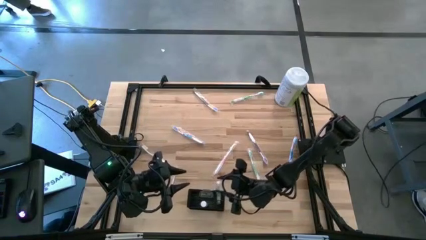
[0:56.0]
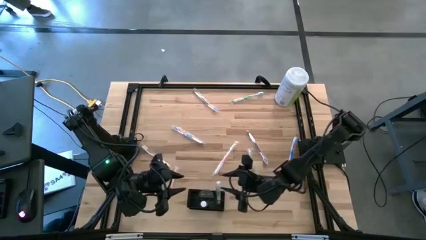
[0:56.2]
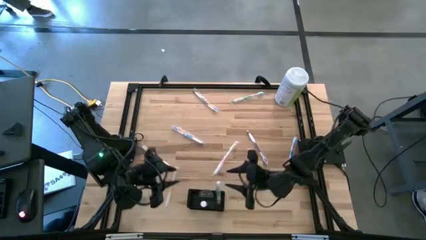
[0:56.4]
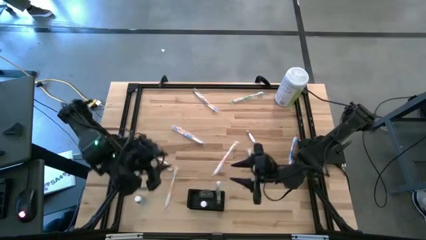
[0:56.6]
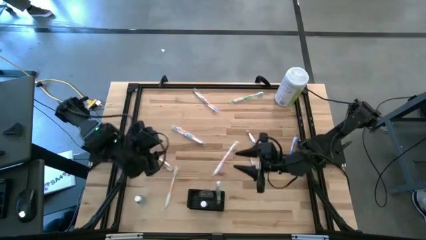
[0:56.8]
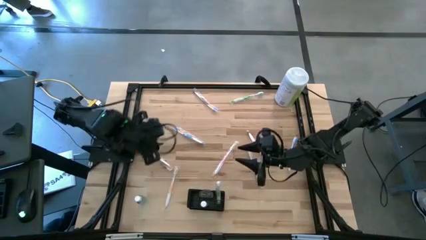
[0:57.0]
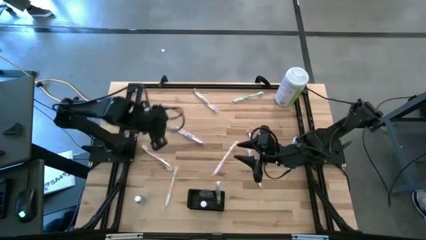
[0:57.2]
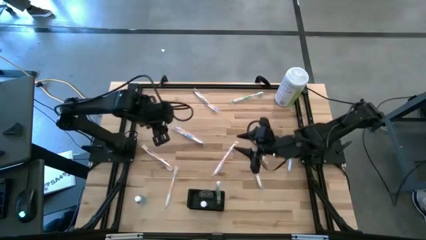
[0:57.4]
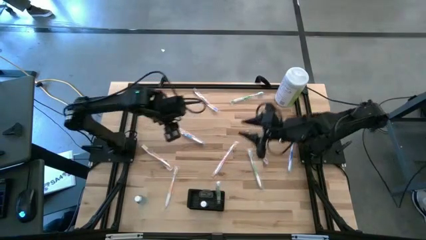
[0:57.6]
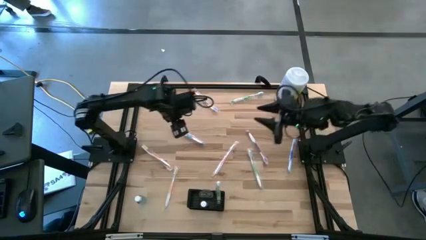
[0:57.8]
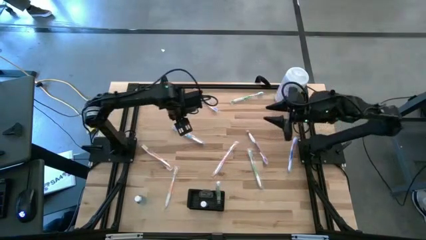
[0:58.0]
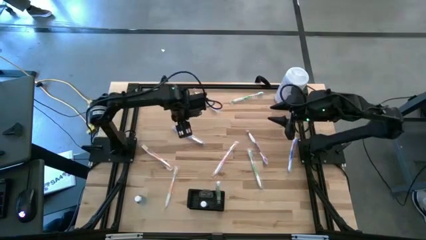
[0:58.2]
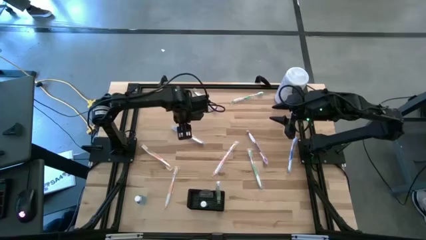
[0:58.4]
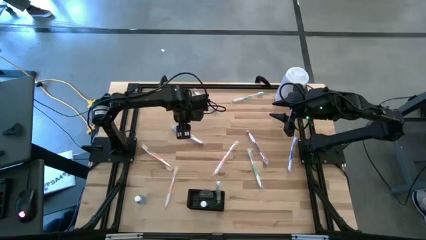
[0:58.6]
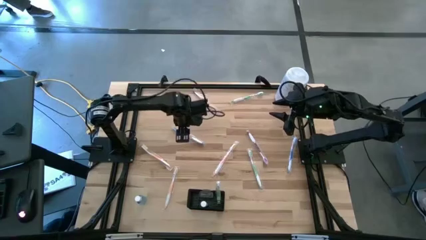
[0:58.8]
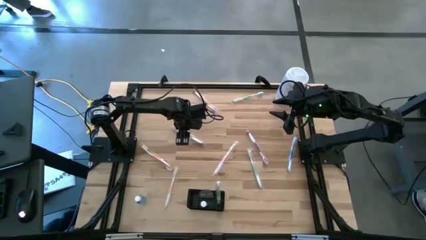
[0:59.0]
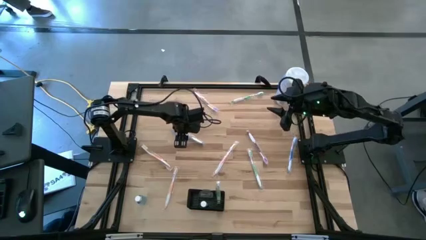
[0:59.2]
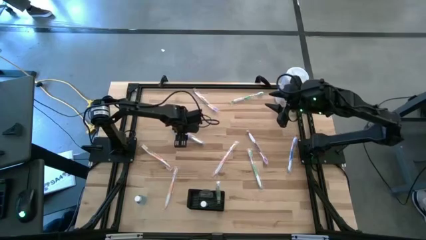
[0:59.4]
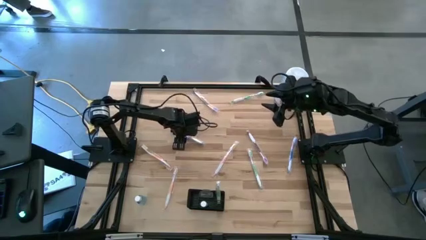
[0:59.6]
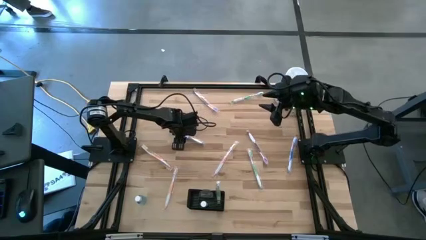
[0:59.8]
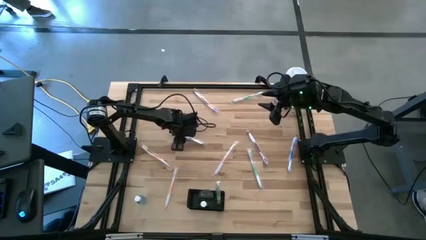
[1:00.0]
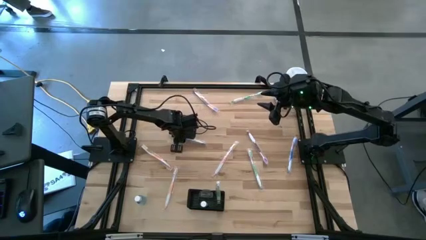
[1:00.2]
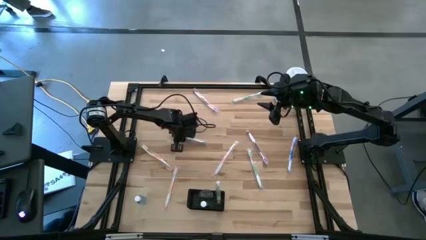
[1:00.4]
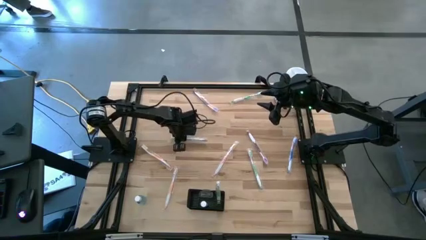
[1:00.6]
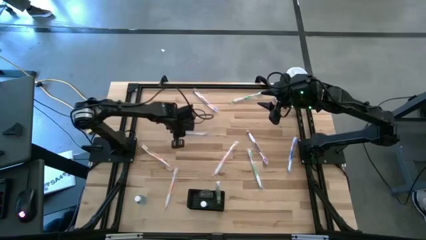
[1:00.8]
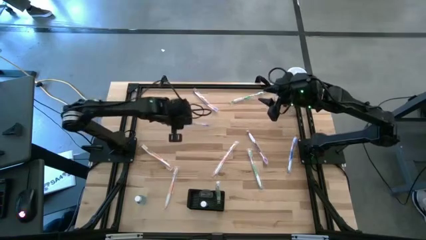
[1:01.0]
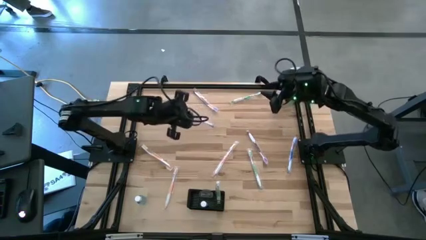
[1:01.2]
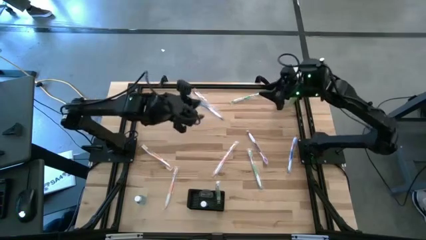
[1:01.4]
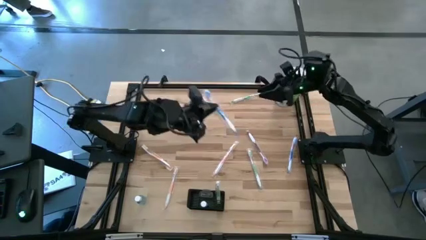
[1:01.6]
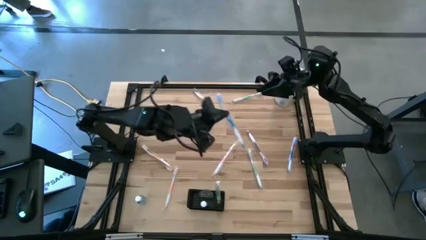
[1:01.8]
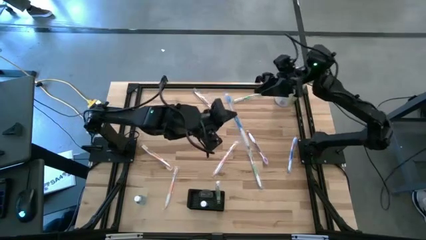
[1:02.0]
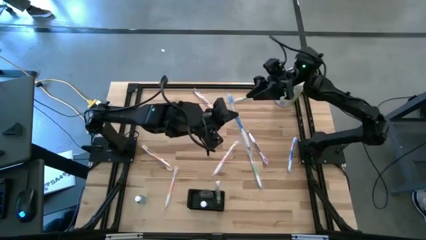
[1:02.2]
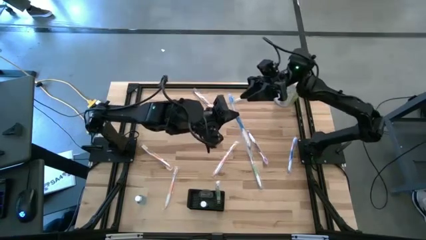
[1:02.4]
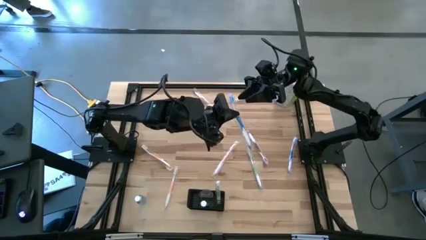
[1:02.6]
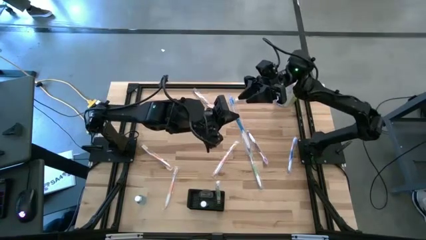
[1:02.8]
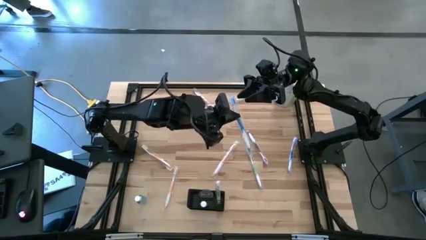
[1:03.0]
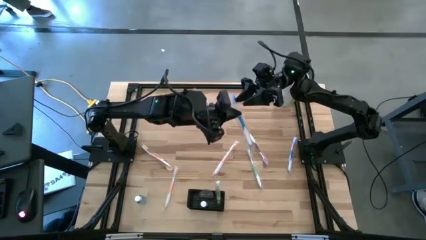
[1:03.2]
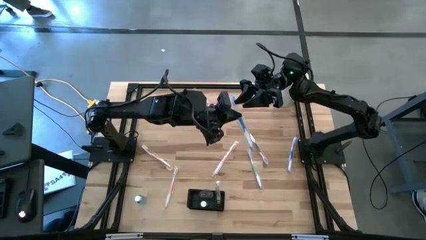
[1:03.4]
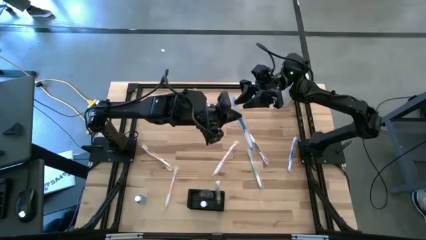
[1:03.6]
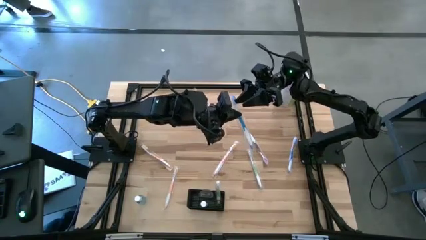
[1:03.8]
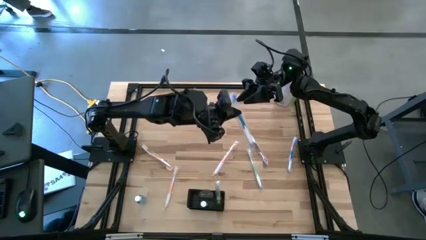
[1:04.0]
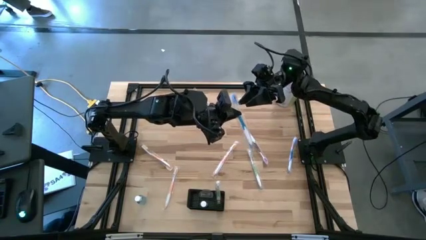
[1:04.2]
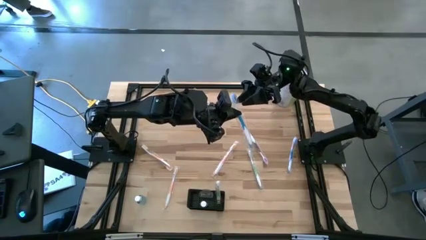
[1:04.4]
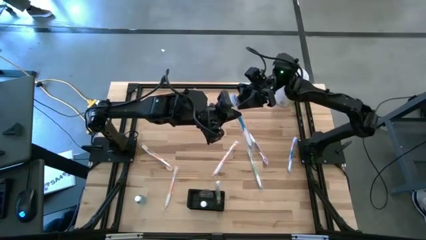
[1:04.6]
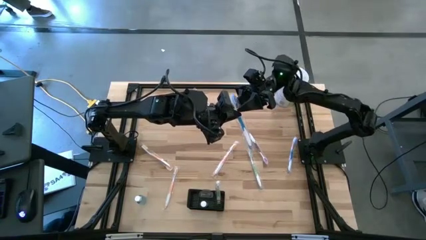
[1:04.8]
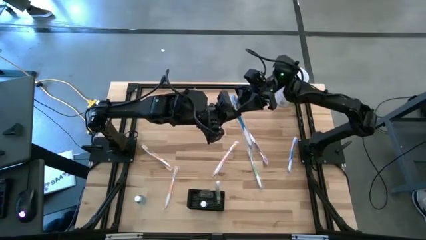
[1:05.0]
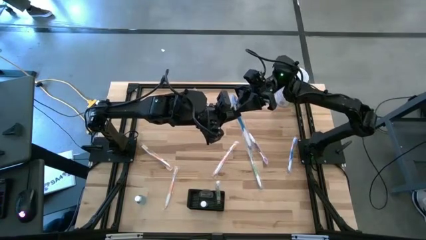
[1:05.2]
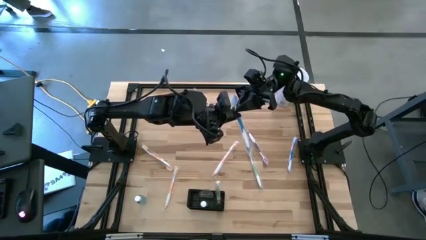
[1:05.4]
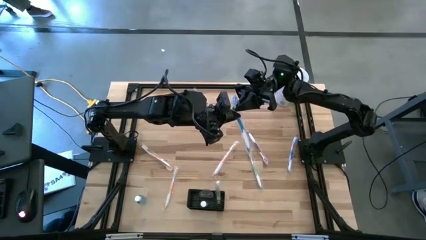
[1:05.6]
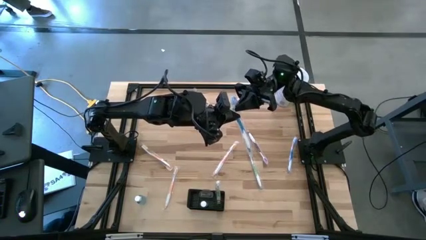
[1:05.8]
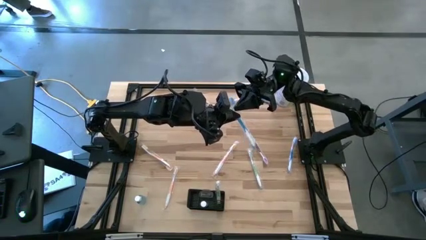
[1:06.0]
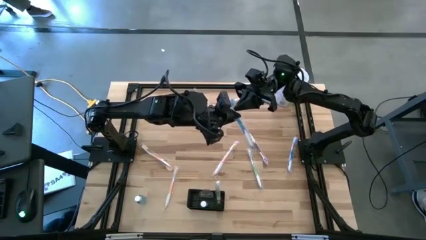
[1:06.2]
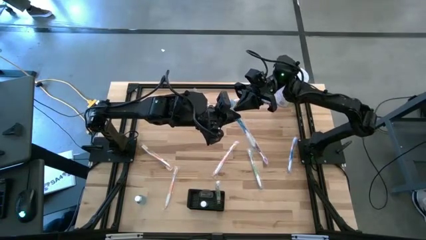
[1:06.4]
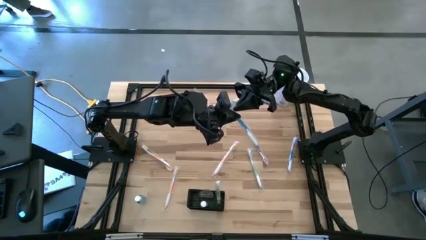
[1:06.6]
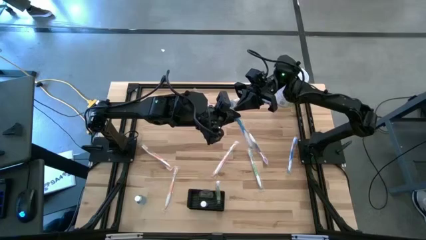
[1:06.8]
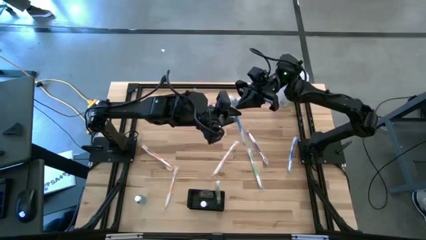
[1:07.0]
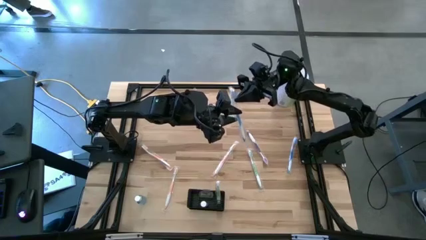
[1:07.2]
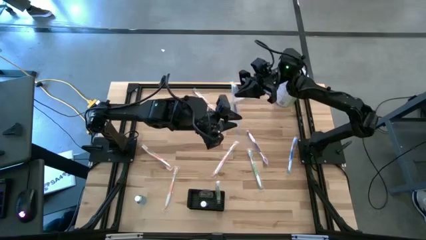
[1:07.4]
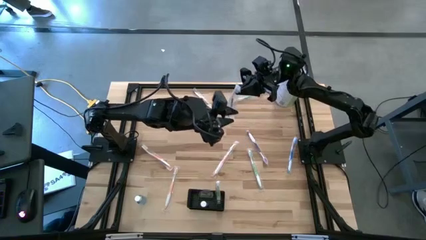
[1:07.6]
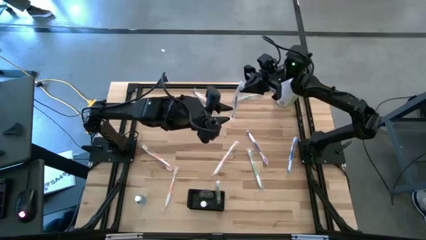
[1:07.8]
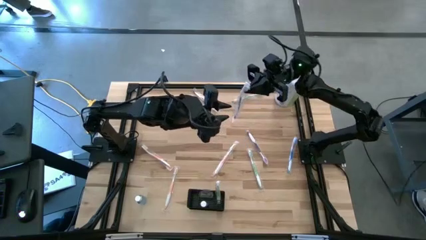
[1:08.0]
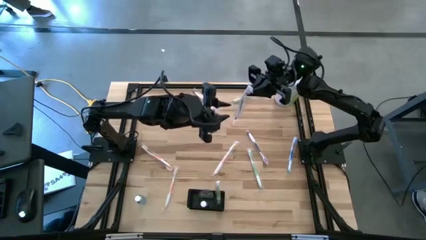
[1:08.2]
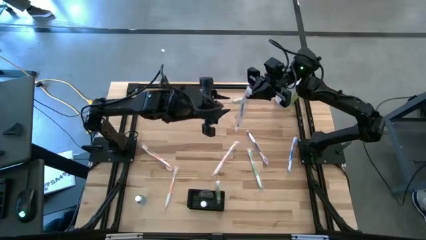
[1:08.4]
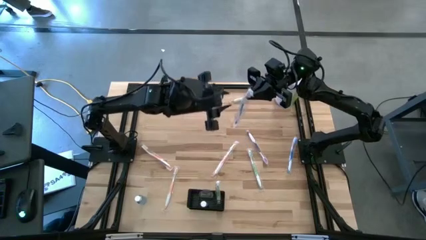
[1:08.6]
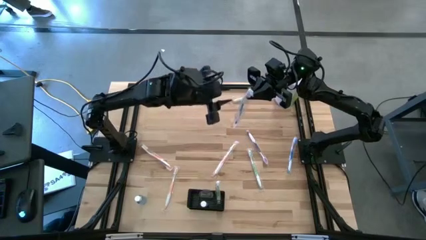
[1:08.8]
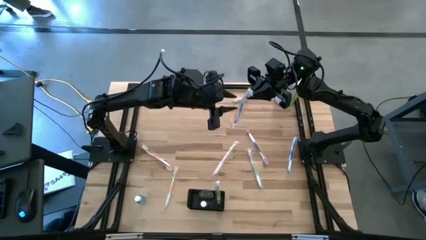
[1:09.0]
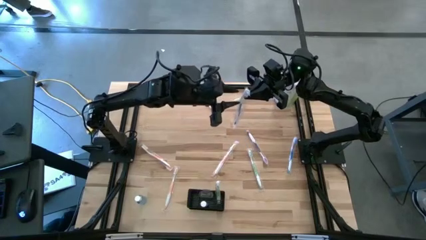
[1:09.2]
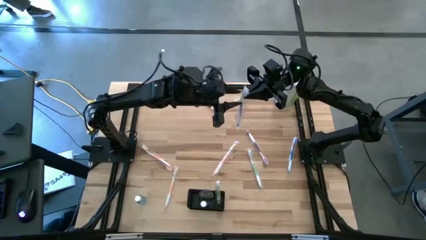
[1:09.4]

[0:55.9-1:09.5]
Task: Pick & Place toothbrushing station
Put the left blue toothbrush into the black wire organizer

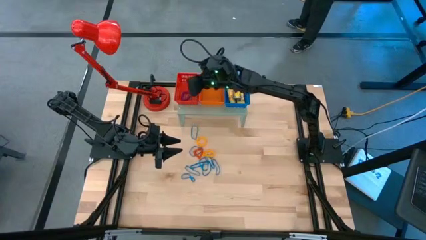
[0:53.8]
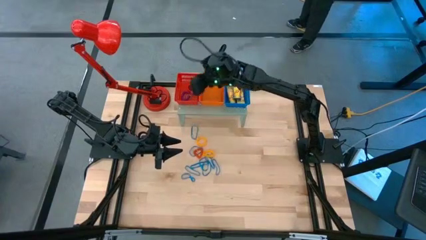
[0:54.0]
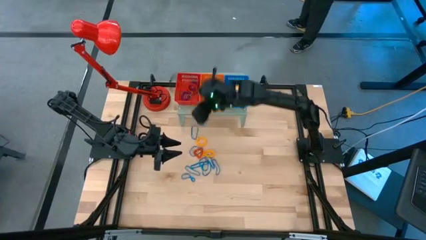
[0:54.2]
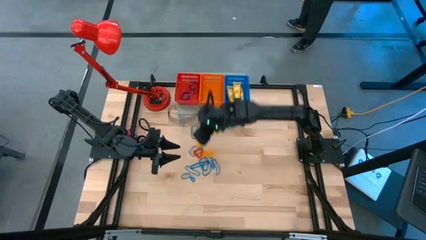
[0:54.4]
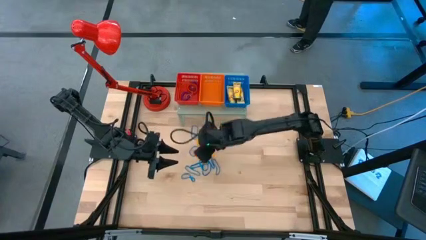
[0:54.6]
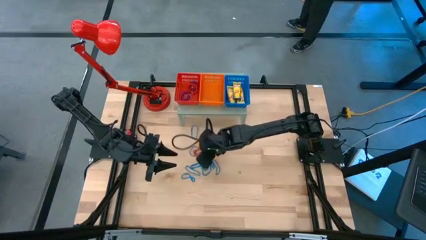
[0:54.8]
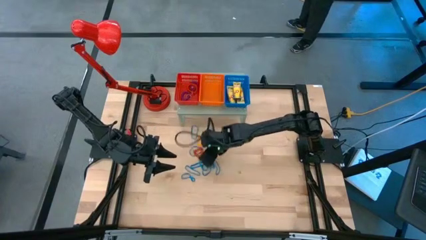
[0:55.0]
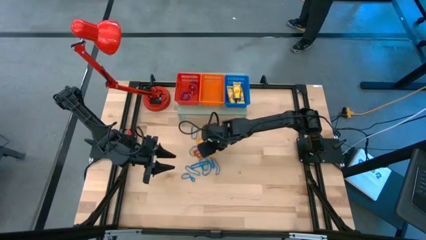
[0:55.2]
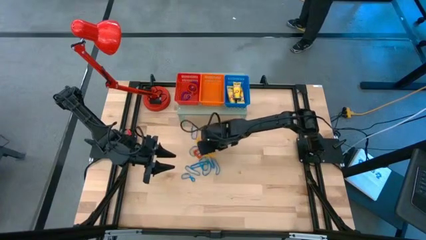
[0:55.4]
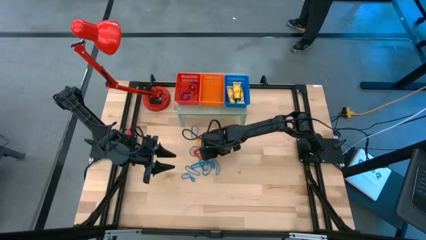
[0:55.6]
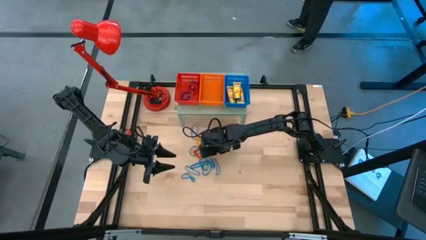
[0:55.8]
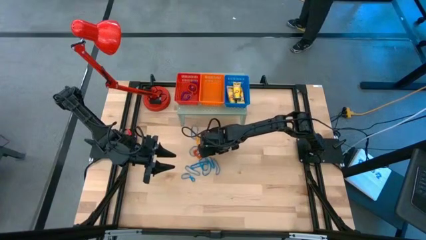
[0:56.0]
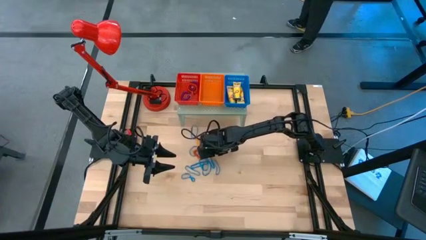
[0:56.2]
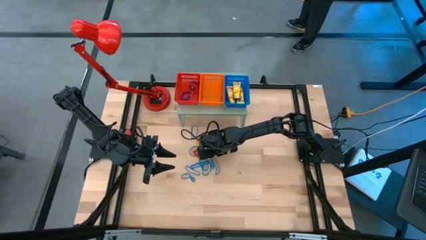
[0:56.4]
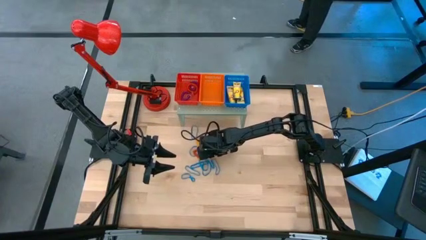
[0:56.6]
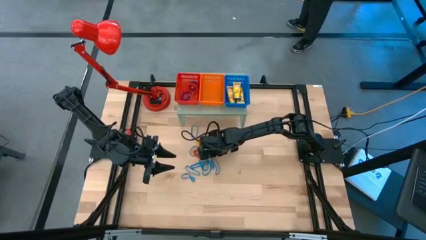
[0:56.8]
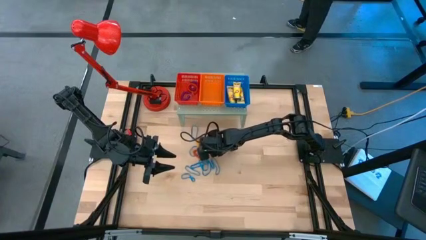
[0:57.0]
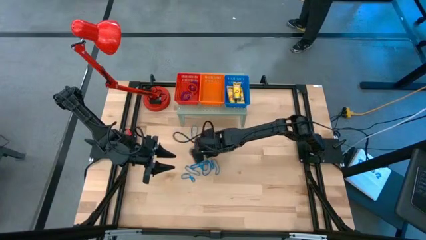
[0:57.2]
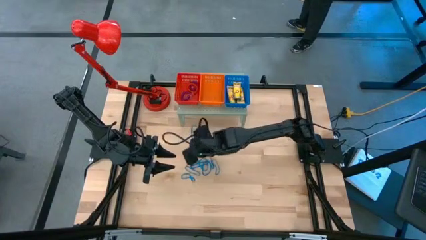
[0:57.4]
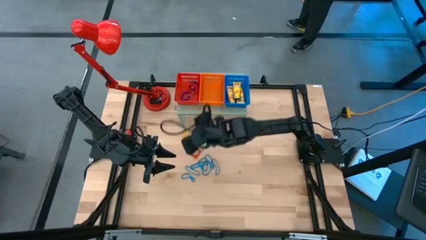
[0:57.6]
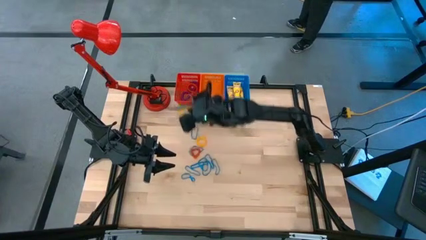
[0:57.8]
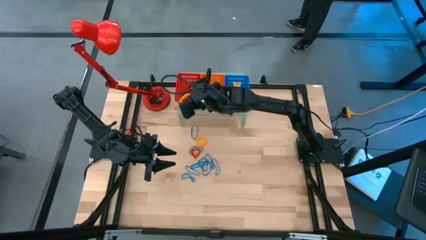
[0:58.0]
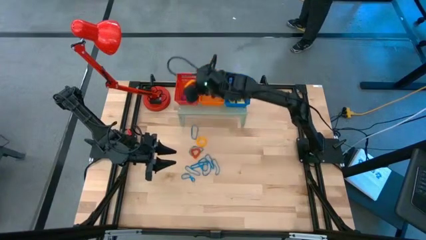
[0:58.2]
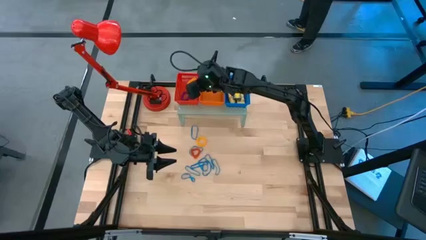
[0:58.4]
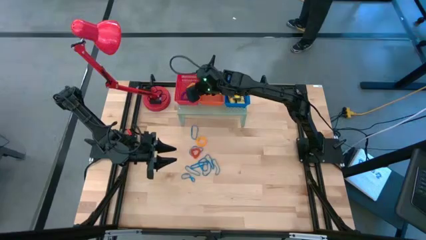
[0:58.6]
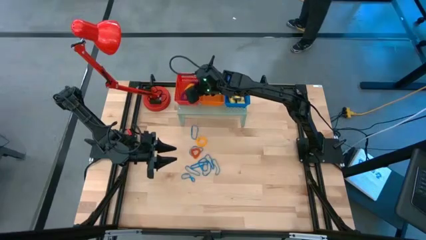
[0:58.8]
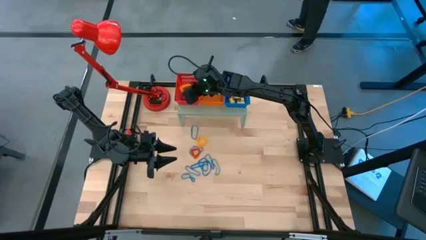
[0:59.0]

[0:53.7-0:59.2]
Task: Pick & Place Office Desk Supplies
Put the yellow spring keychain into the red bin on the shelf
